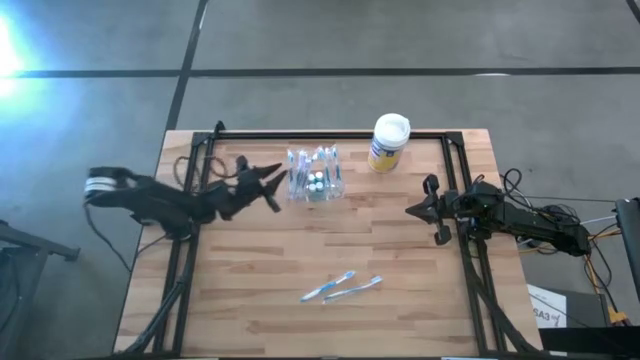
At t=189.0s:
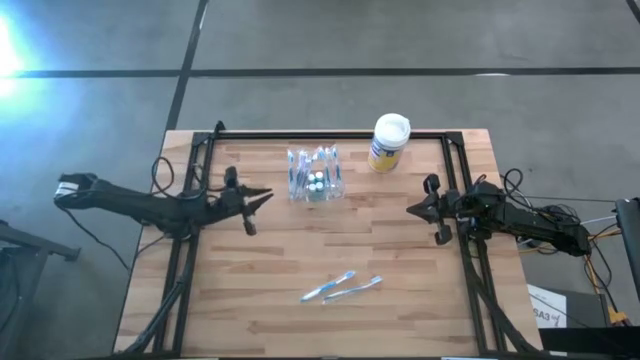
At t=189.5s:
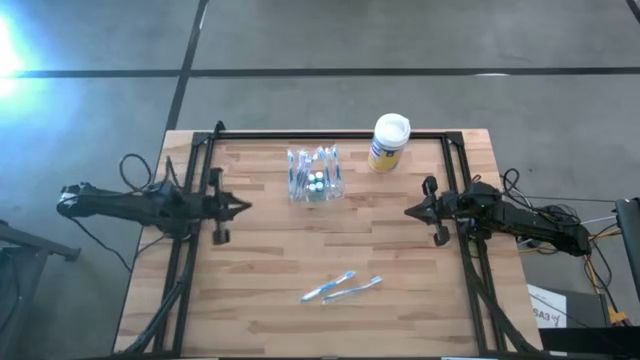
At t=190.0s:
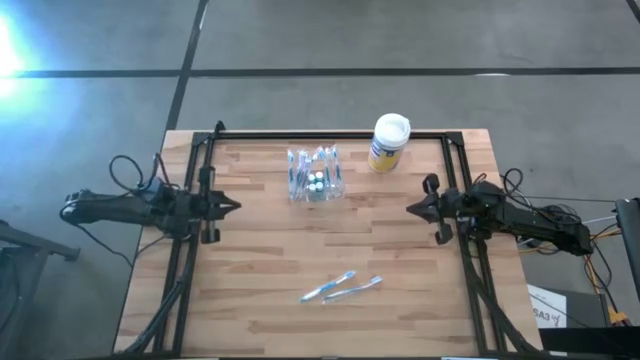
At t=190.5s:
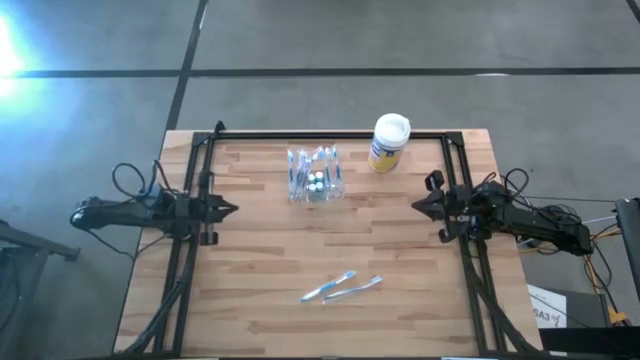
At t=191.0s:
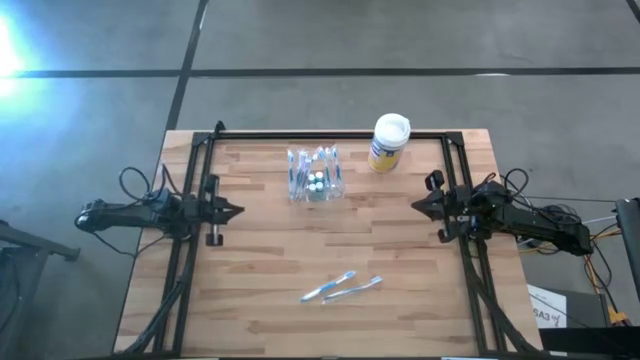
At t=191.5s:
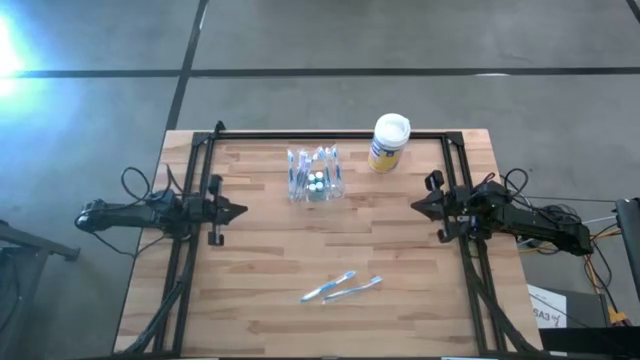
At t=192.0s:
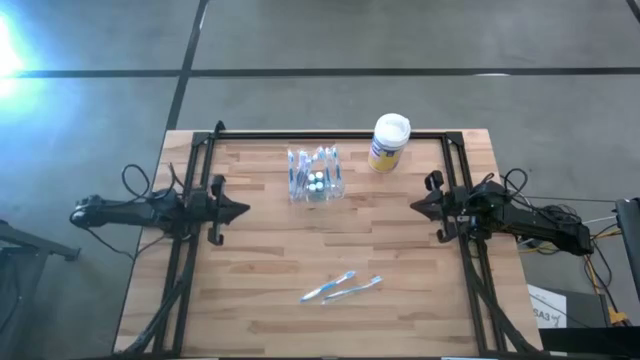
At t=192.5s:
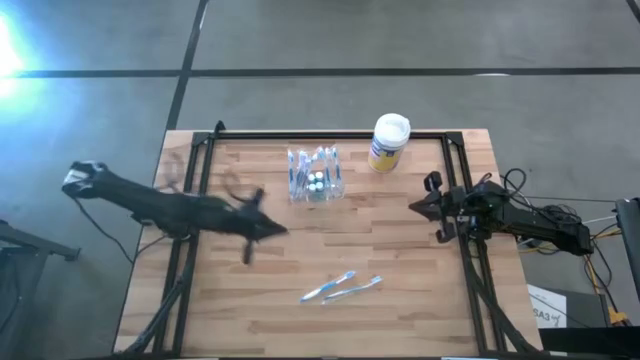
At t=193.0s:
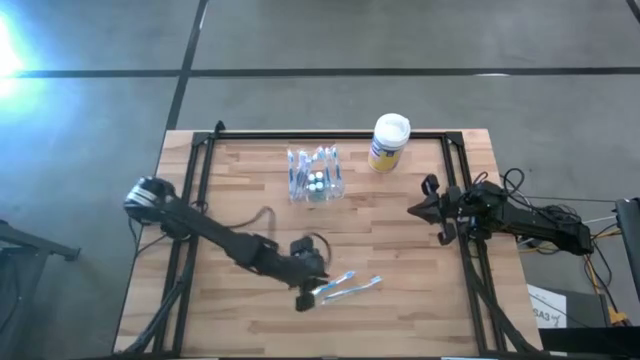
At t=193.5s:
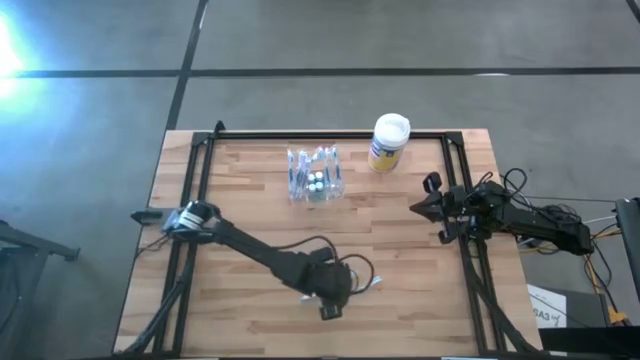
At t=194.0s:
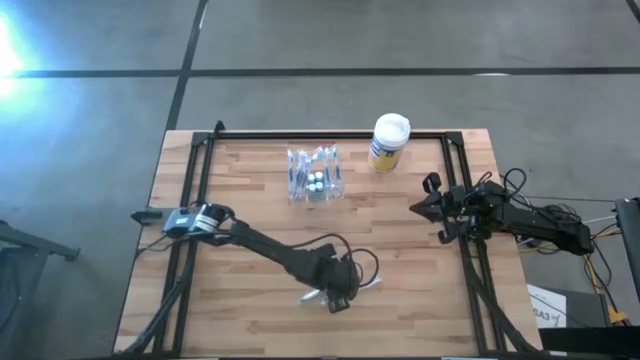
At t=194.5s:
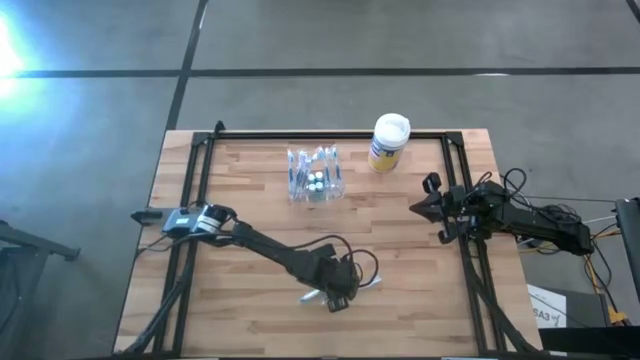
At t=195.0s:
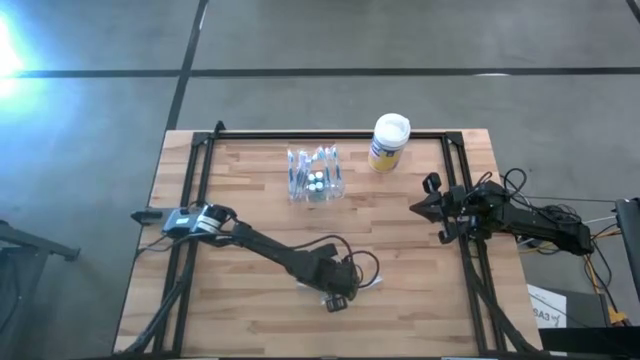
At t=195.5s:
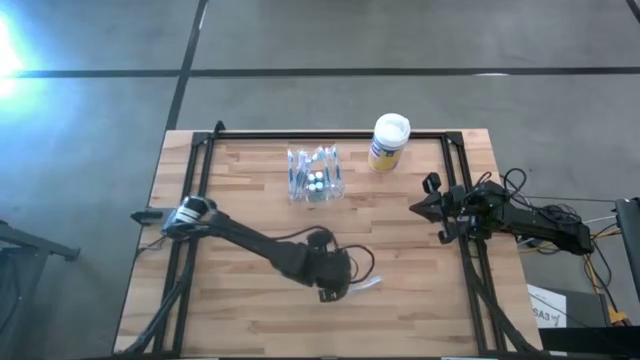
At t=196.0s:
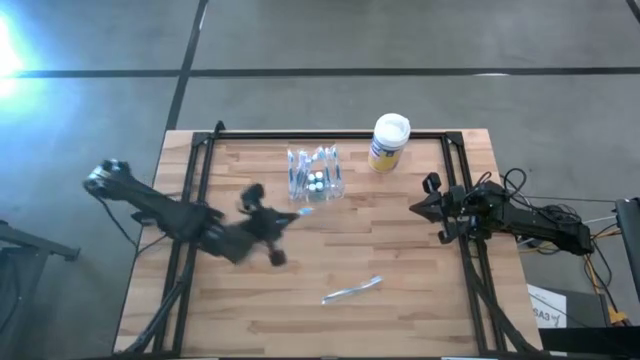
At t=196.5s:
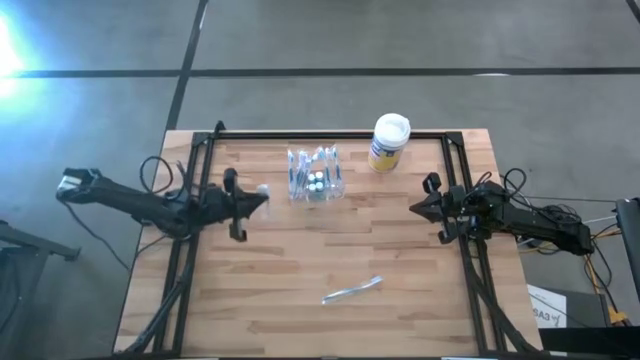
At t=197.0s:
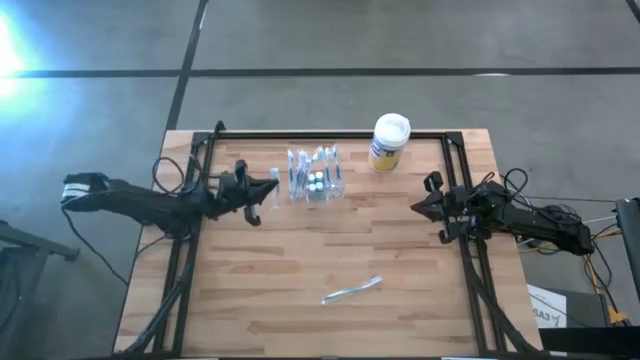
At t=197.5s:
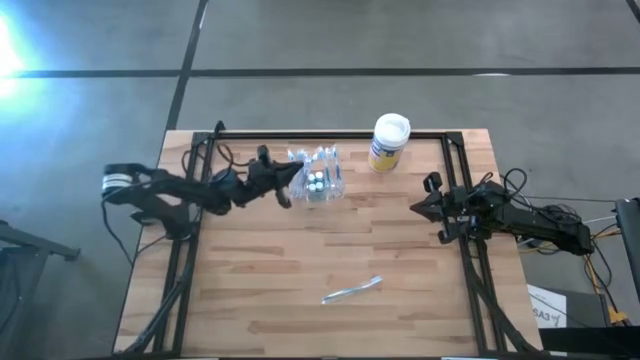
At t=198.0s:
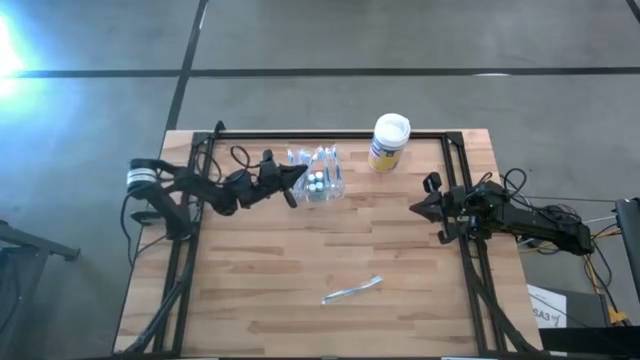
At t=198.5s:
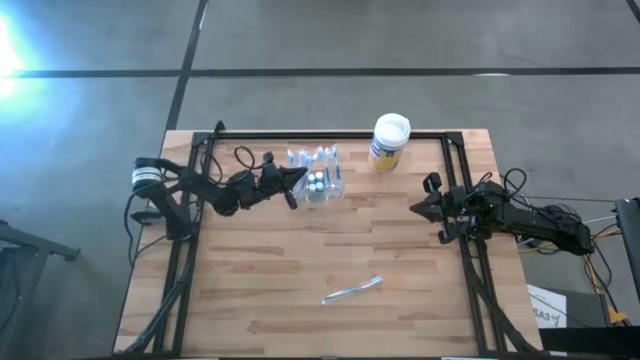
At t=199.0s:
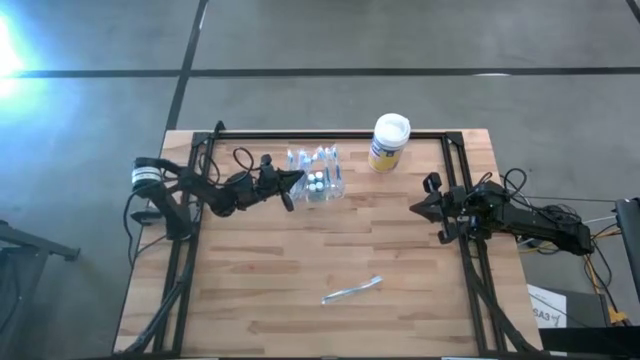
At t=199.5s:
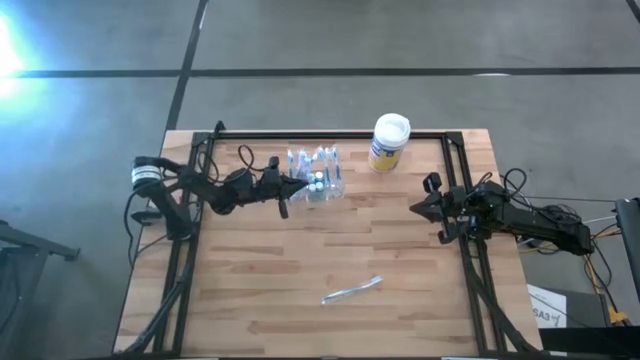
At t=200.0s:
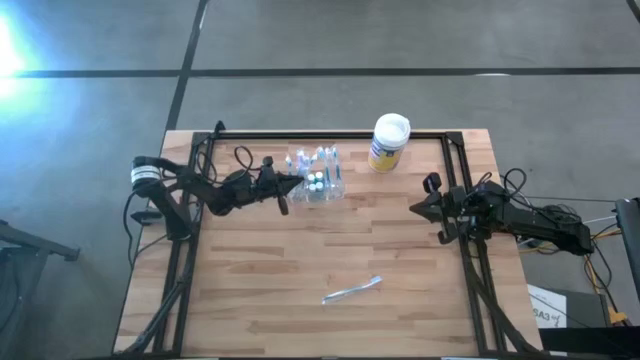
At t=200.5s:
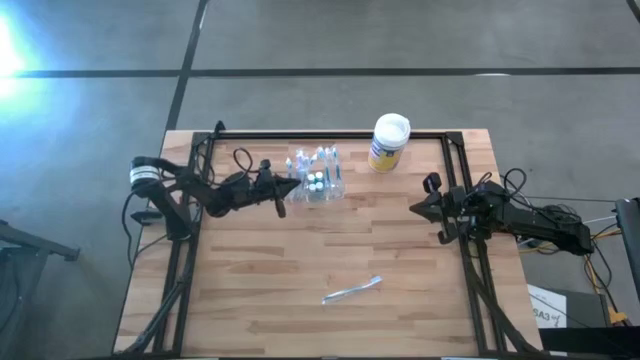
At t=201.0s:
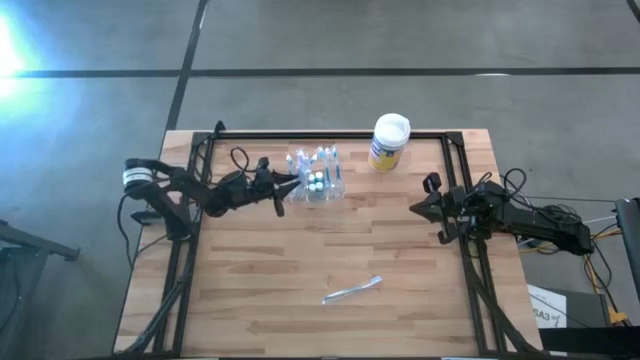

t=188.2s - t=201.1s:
Task: Pick & Place toothbrushing station
Put the blue toothbrush into the transparent organizer

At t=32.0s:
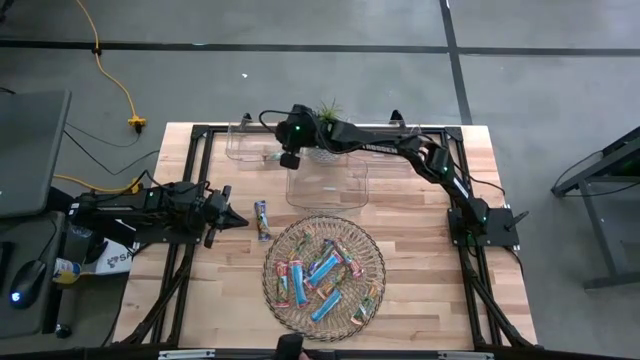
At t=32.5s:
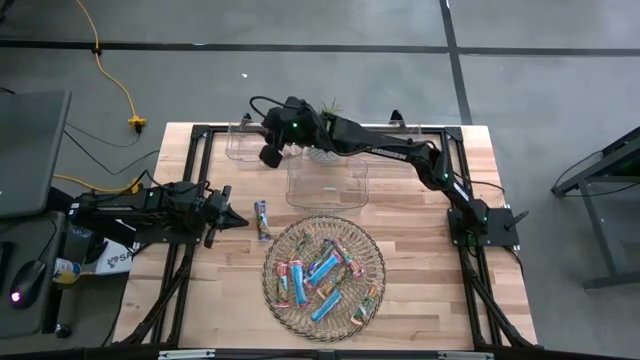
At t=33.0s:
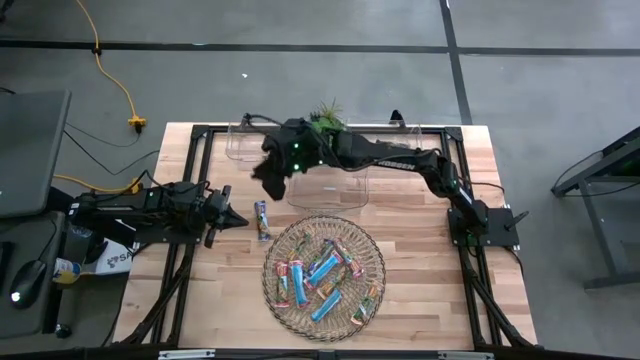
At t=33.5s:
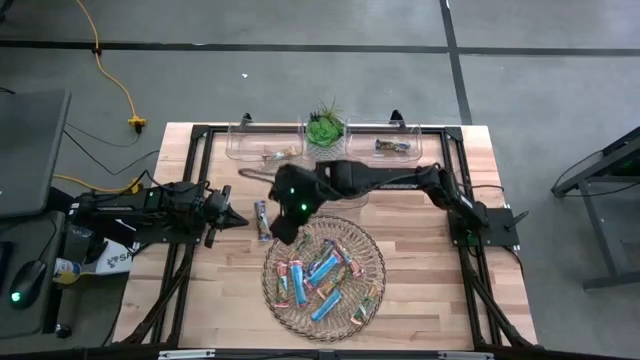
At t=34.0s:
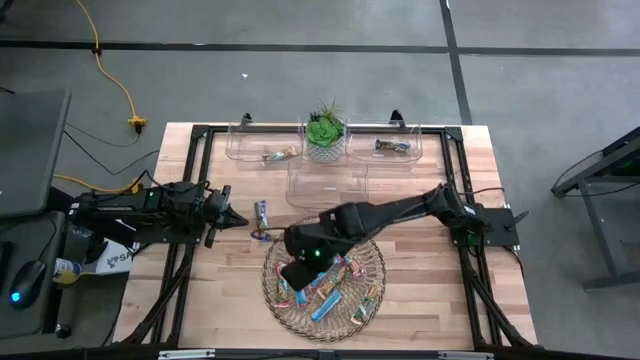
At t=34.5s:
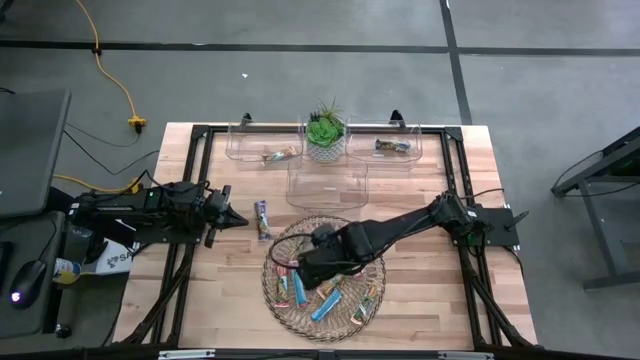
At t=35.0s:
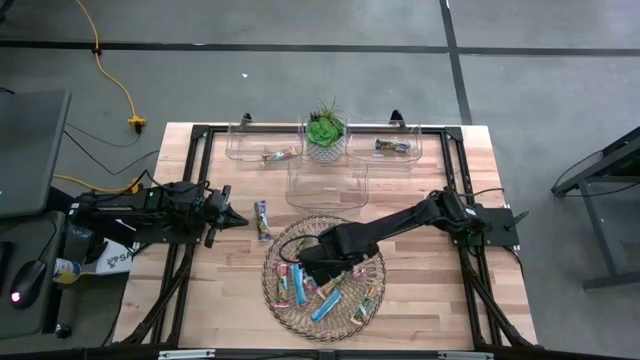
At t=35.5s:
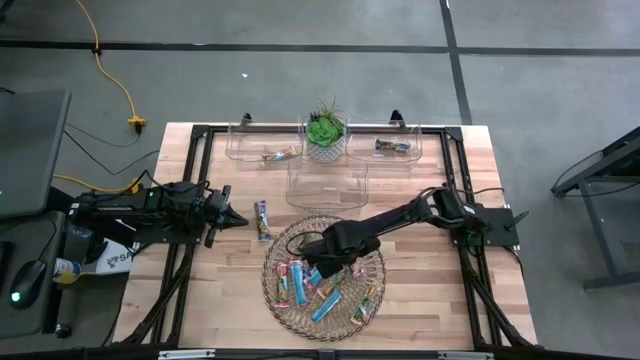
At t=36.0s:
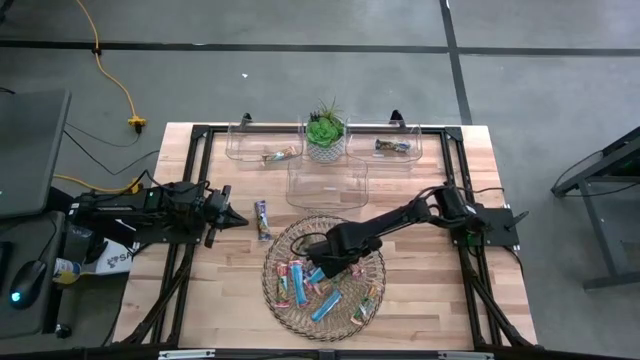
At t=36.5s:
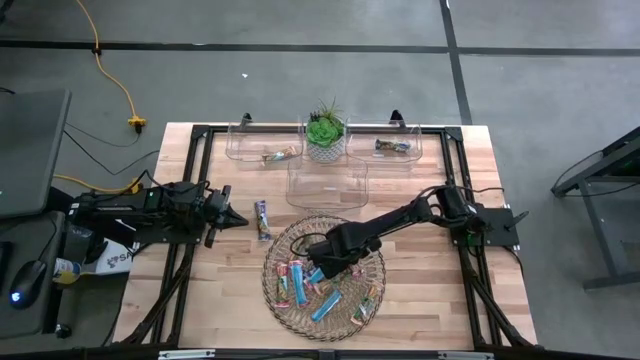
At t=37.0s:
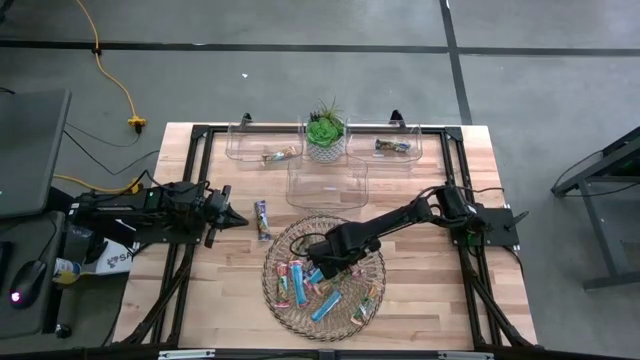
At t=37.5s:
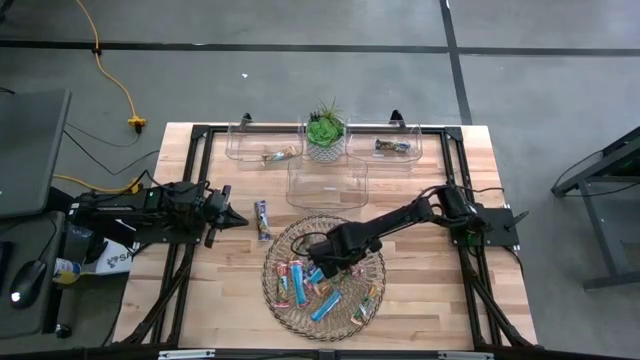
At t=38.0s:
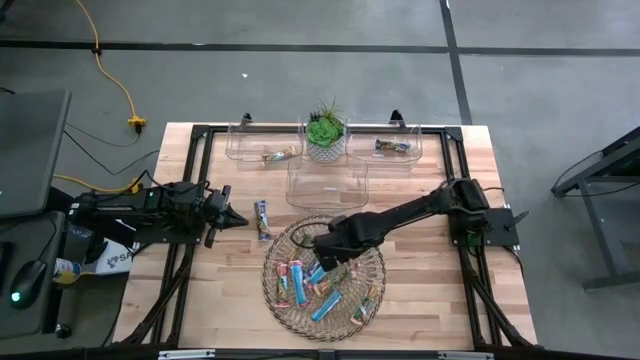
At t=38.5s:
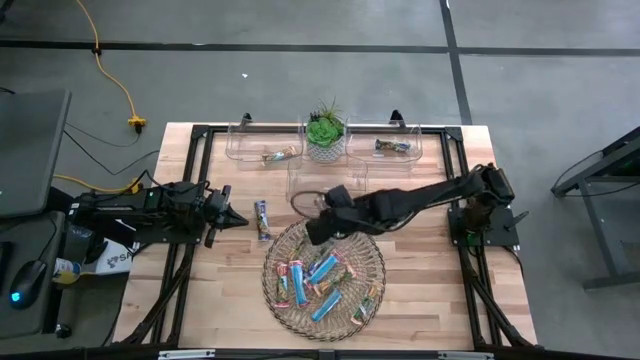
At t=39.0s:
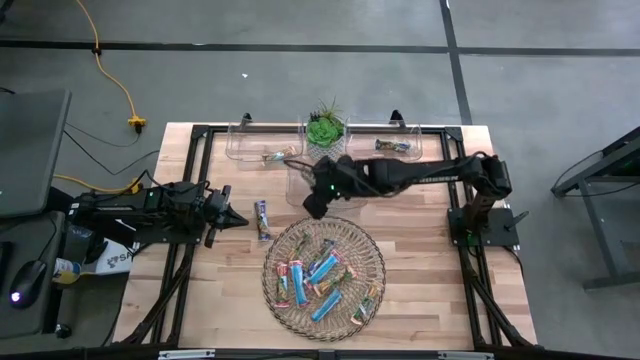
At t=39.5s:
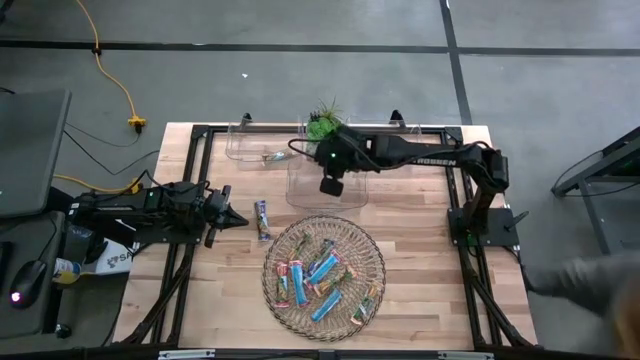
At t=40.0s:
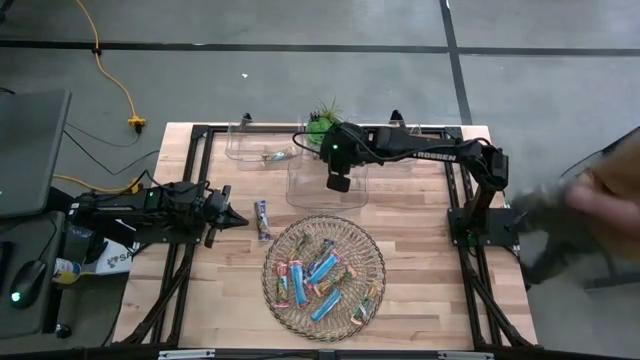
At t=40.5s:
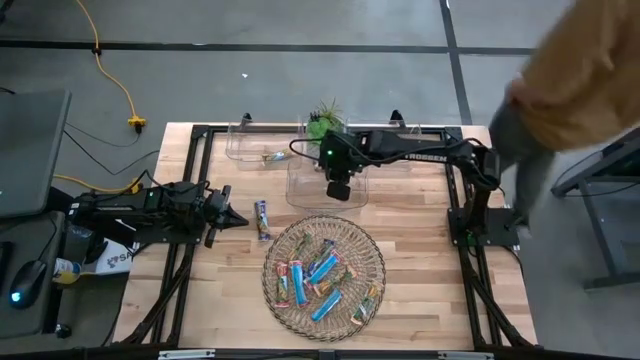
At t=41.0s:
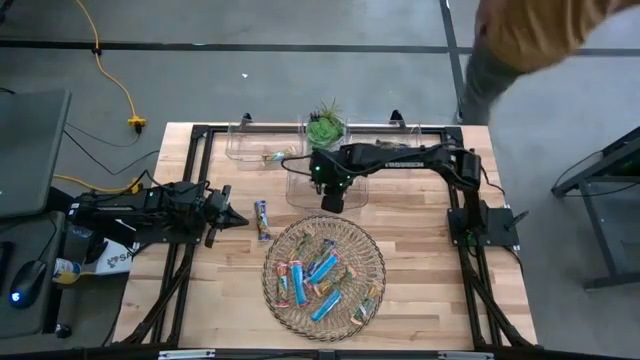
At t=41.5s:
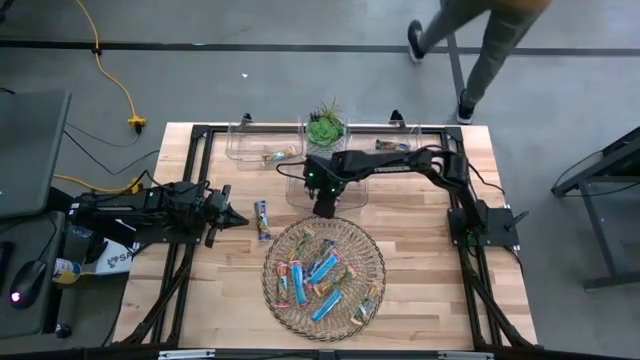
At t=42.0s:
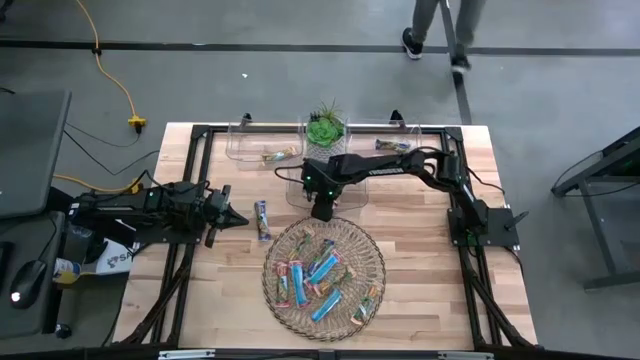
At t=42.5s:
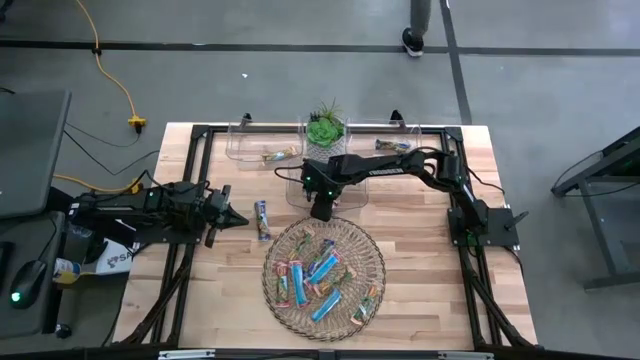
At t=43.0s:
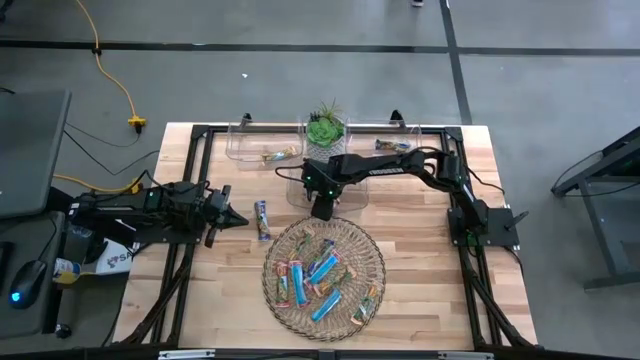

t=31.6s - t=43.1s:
Task: Pick and place Granola Bars by type
Put the red granola bar into the bottom transparent bin
